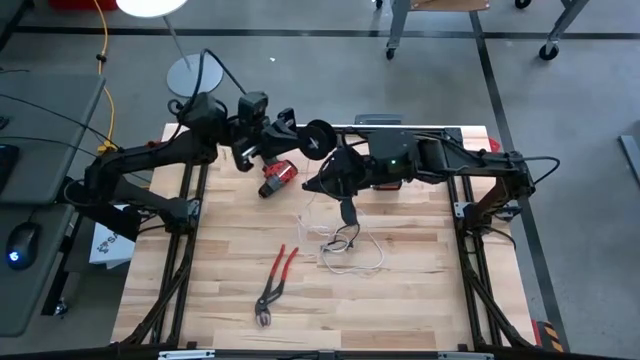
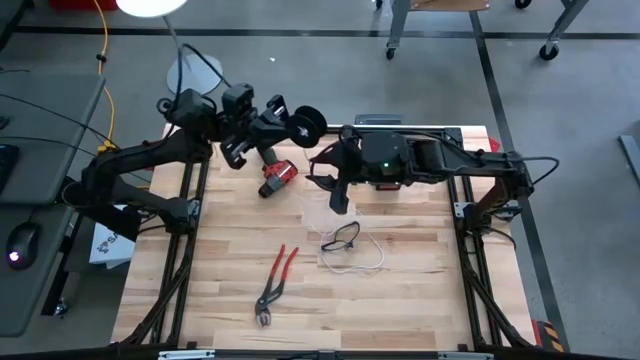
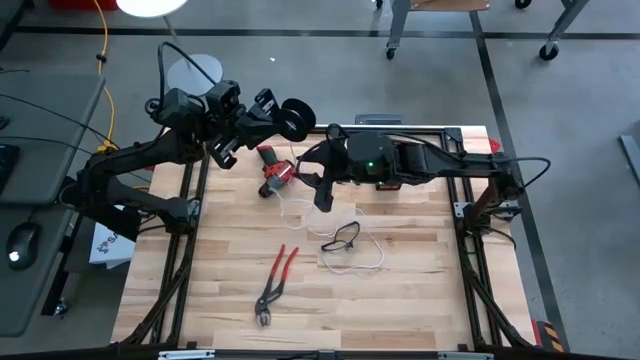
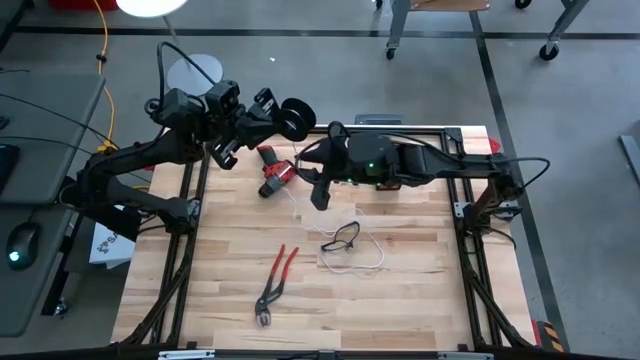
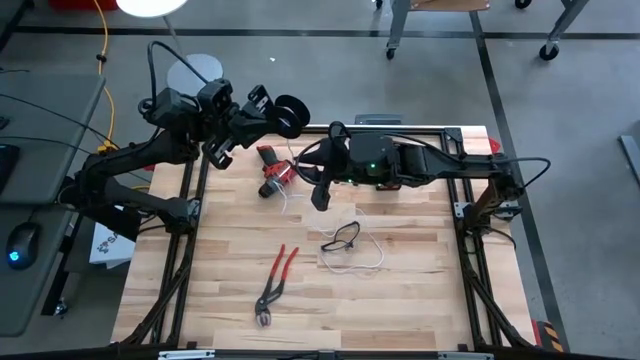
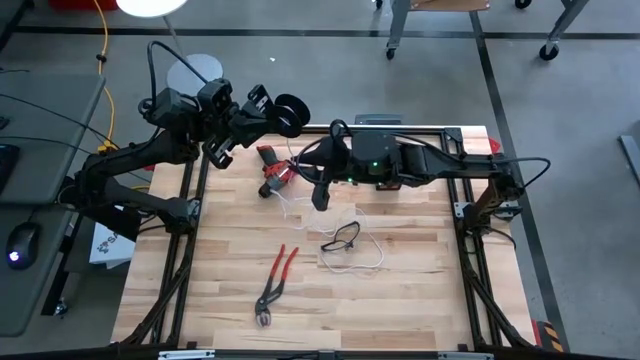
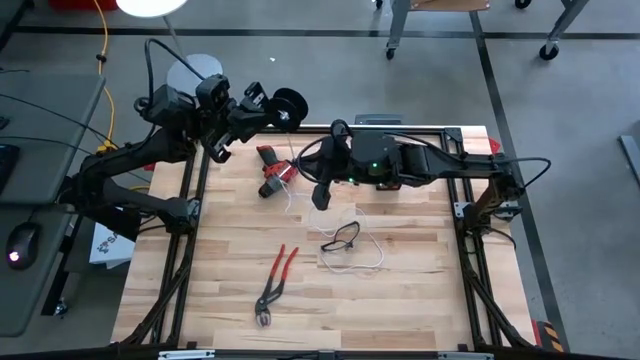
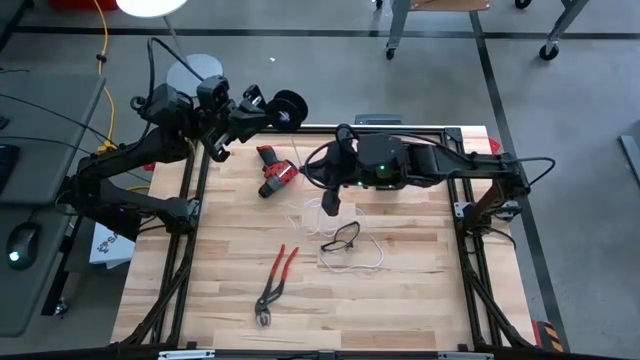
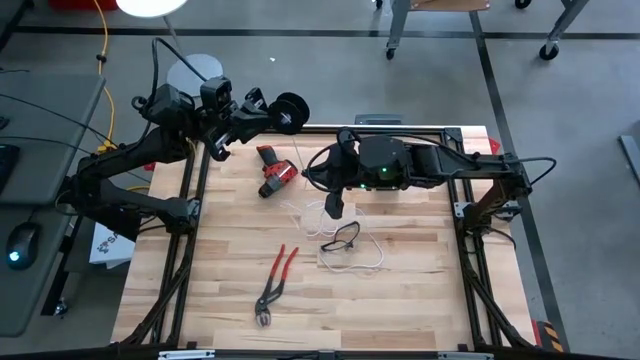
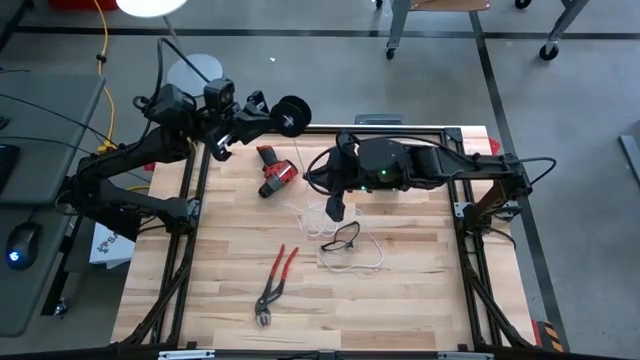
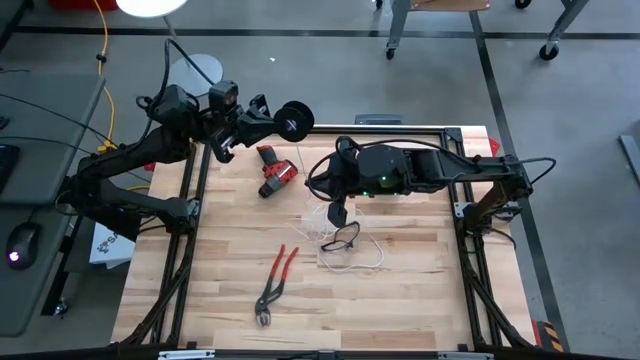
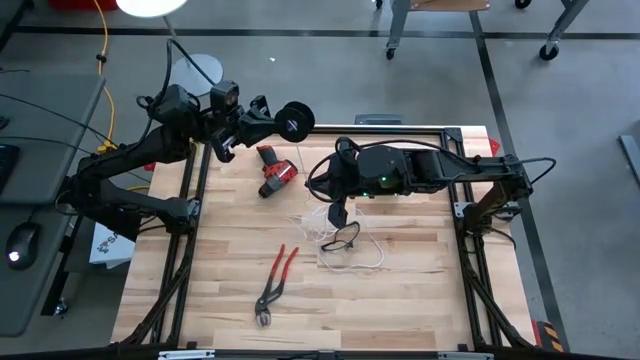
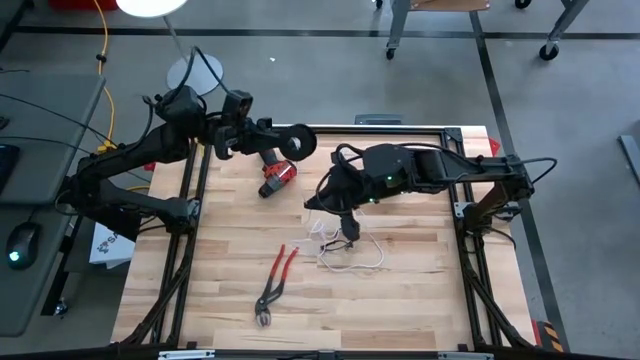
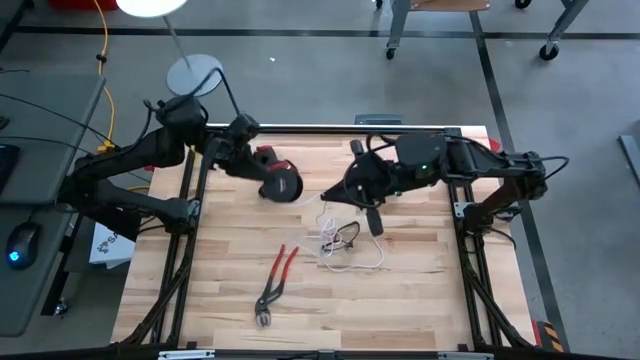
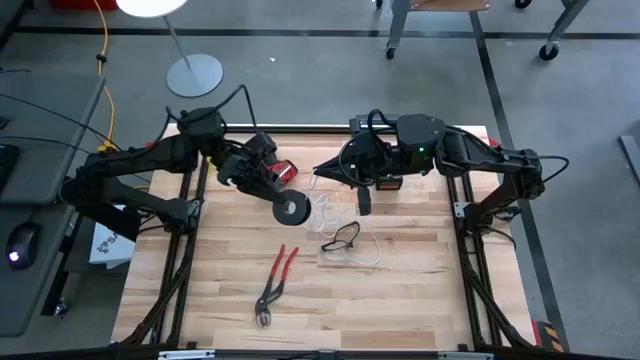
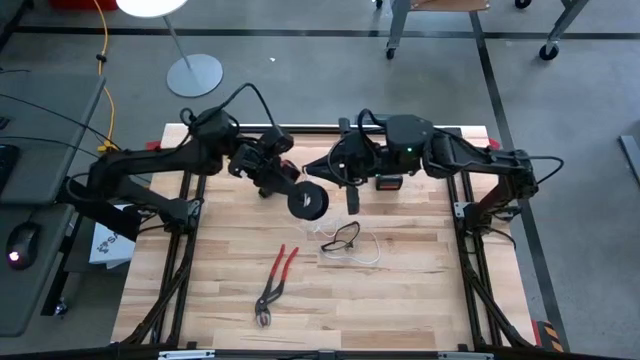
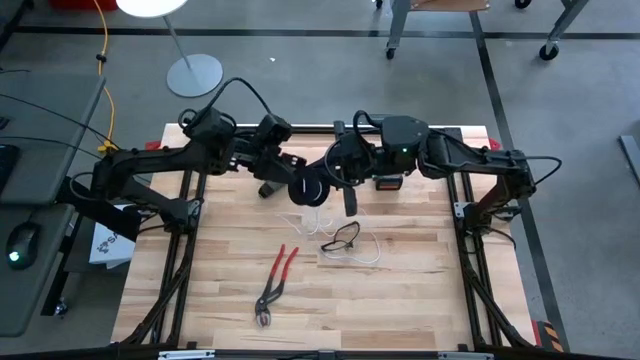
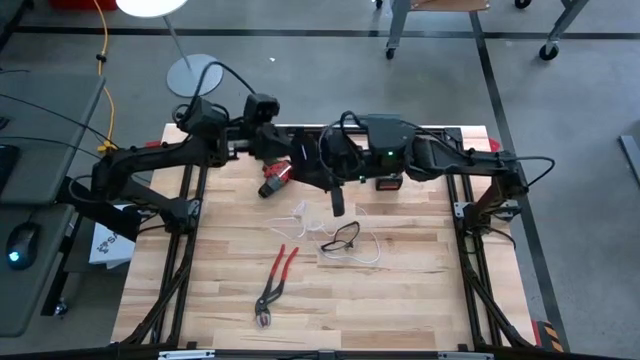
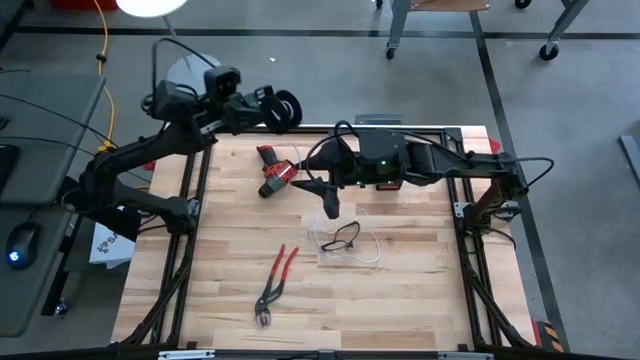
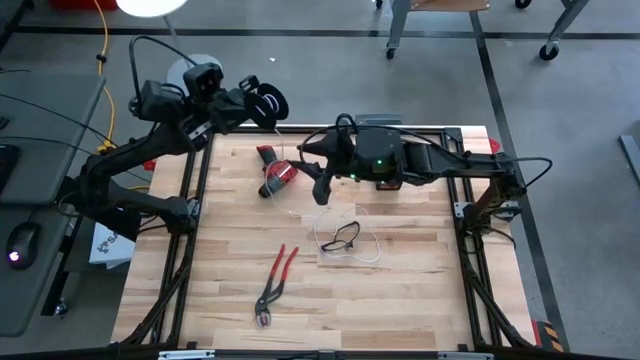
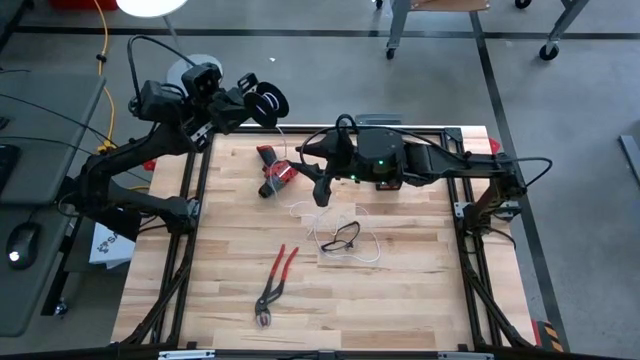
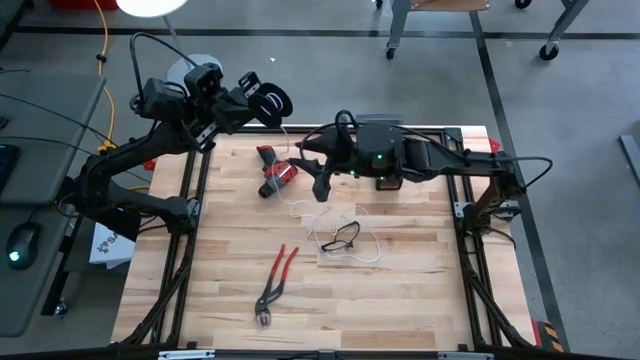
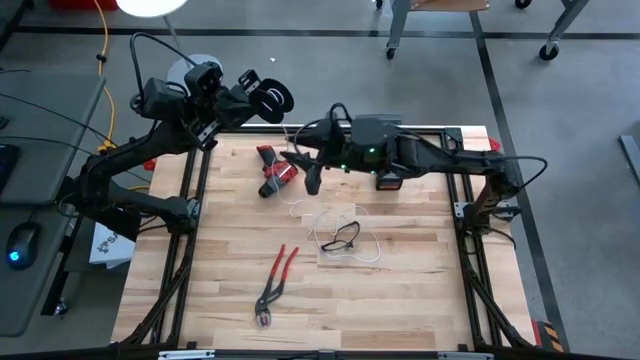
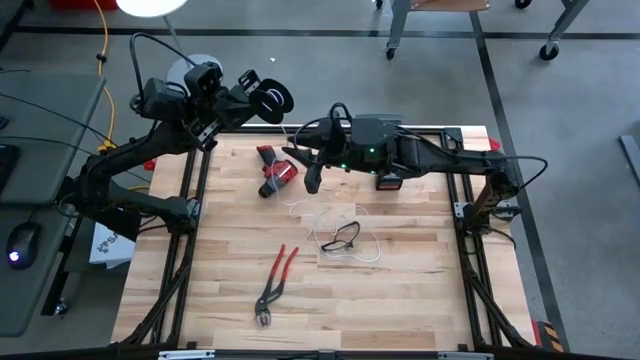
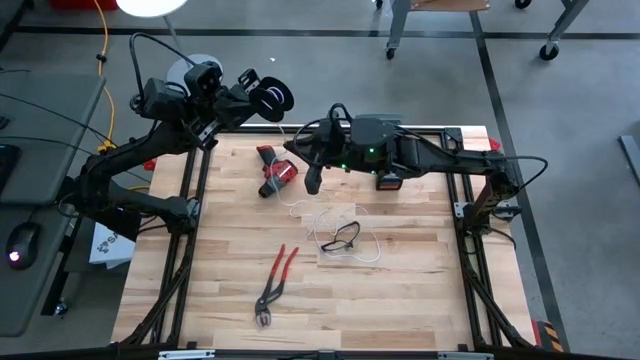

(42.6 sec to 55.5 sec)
Task: Coil cords
Coil the white wire onto the black spool

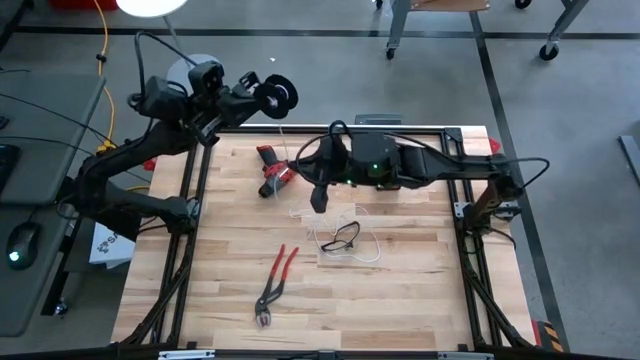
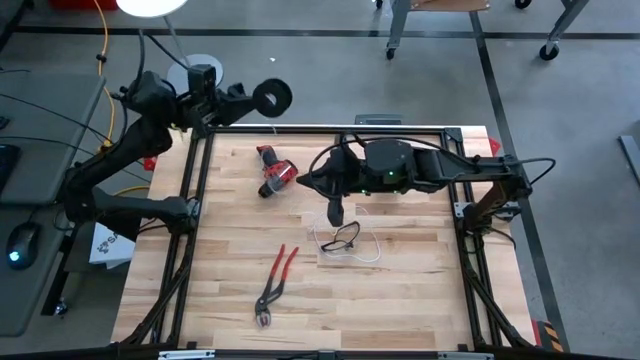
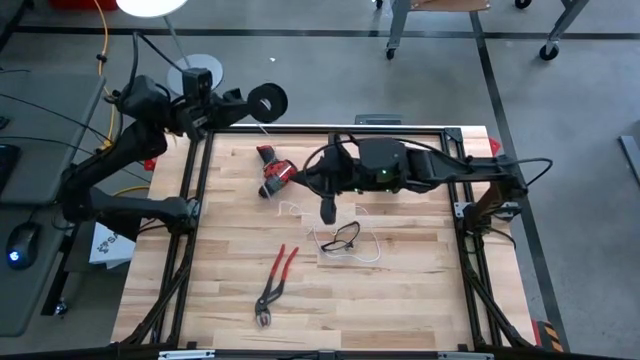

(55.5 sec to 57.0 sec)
Coil the white wire onto the black spool

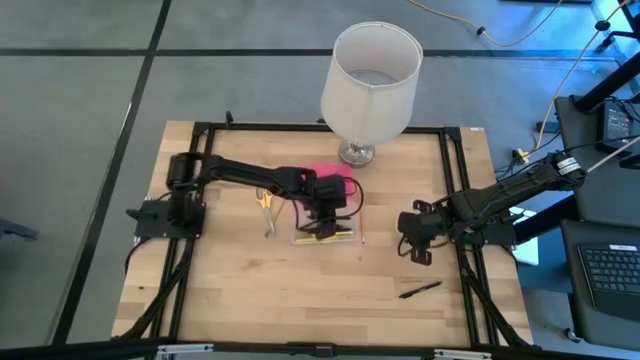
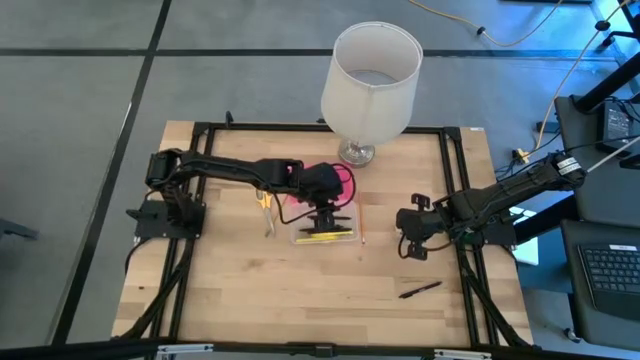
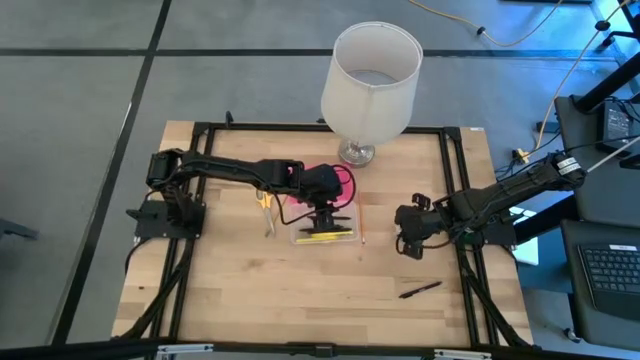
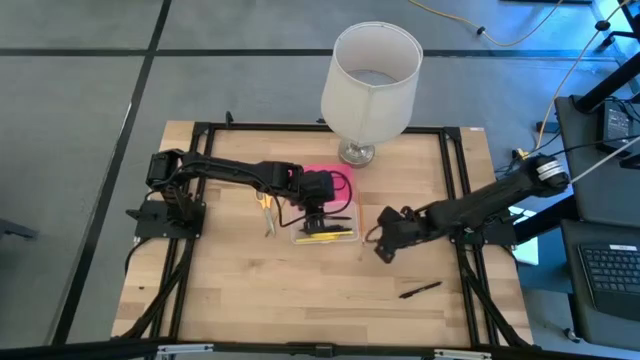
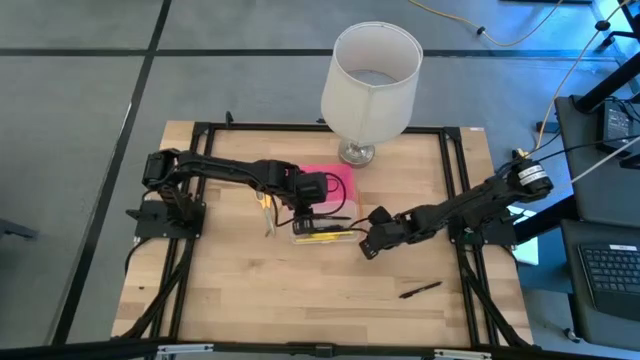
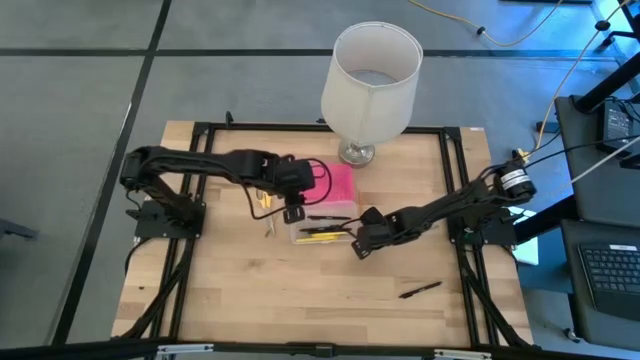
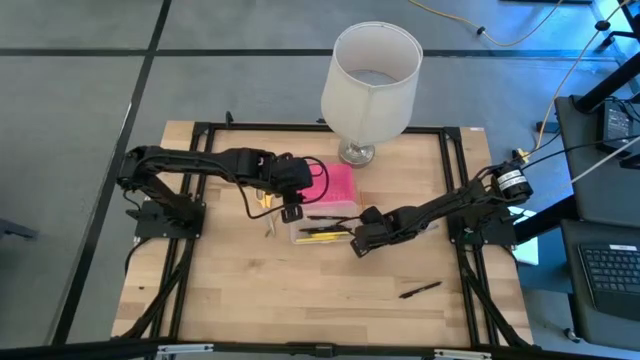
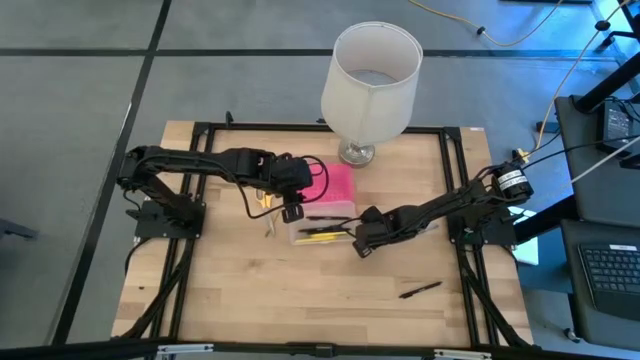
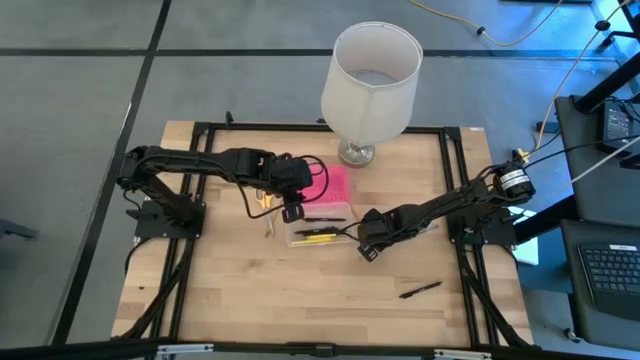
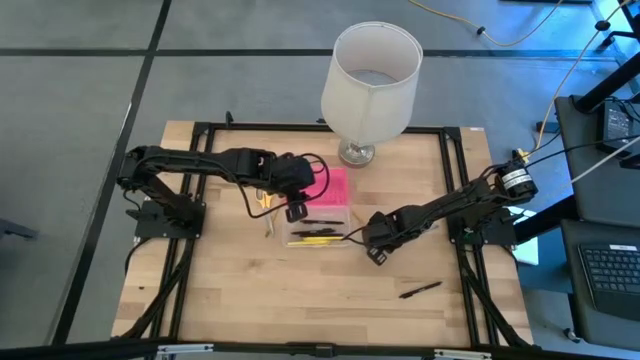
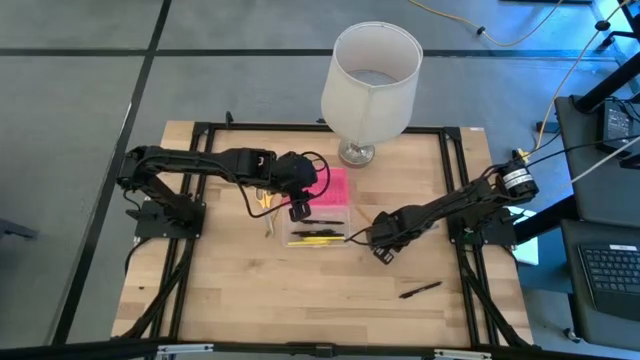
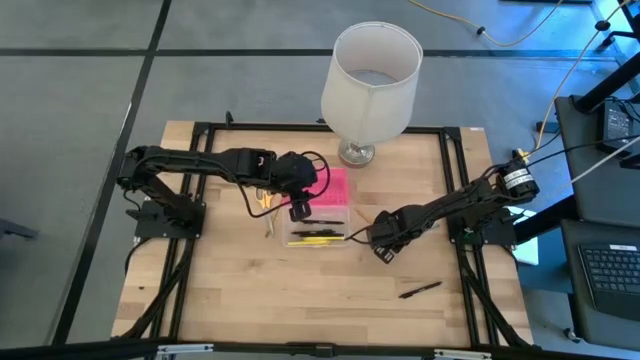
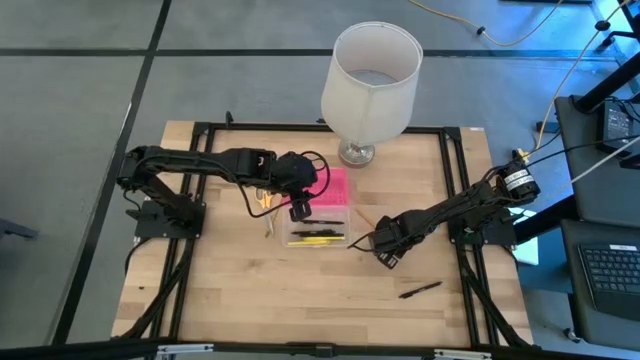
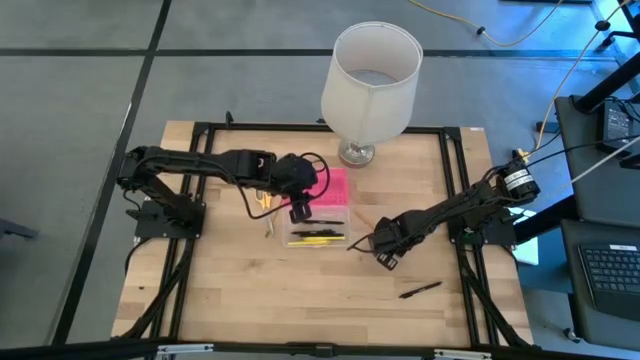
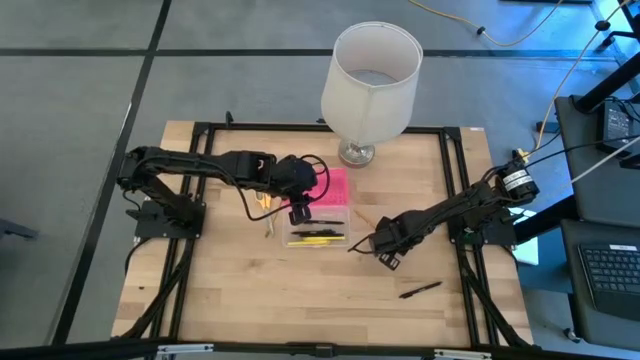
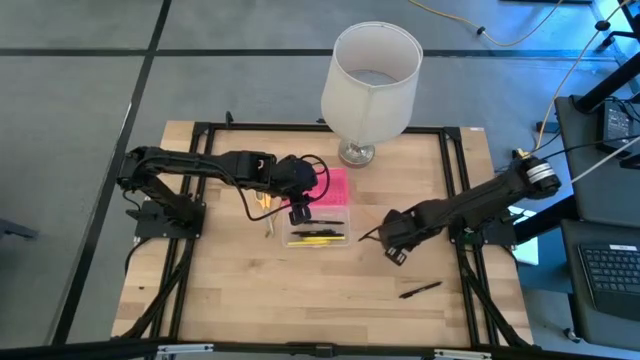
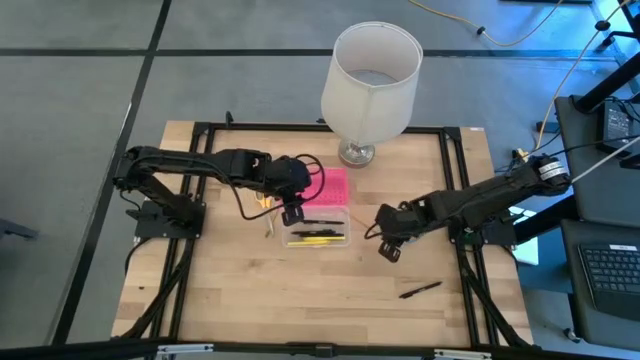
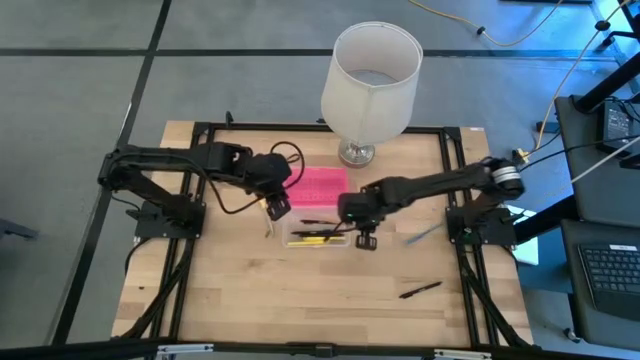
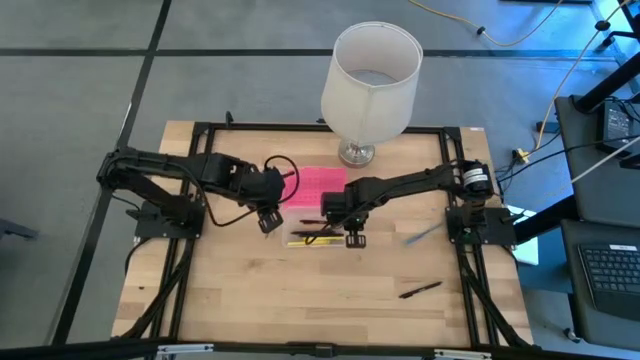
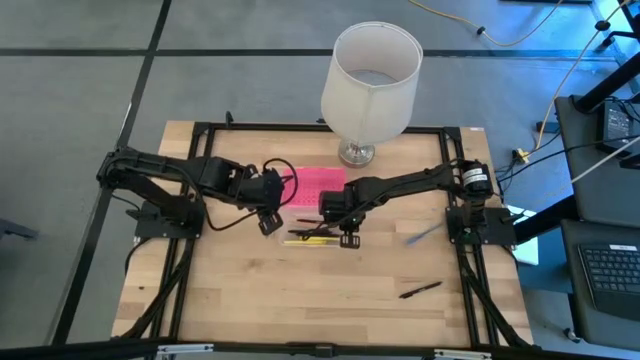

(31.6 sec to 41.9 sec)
Task: Pick & place school supplies into a supply box
Put the orange pencil into the supply box
